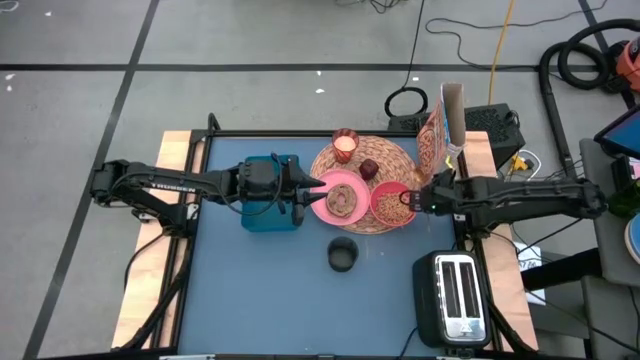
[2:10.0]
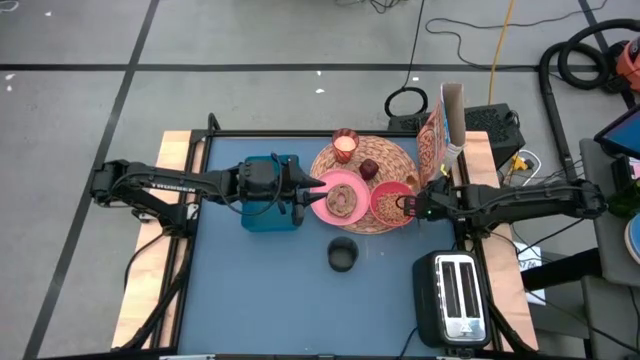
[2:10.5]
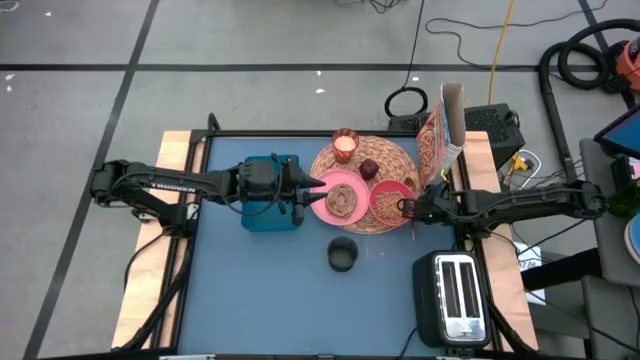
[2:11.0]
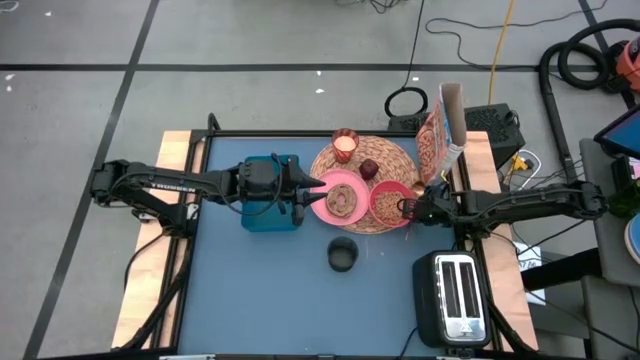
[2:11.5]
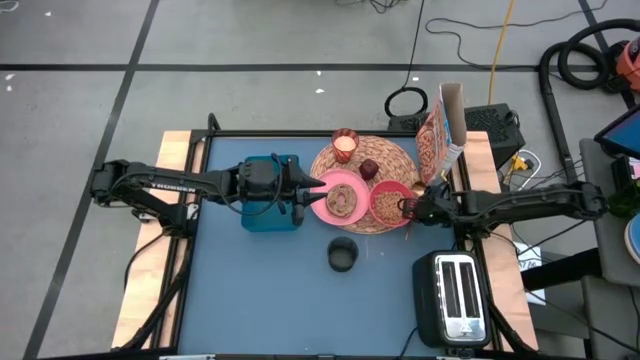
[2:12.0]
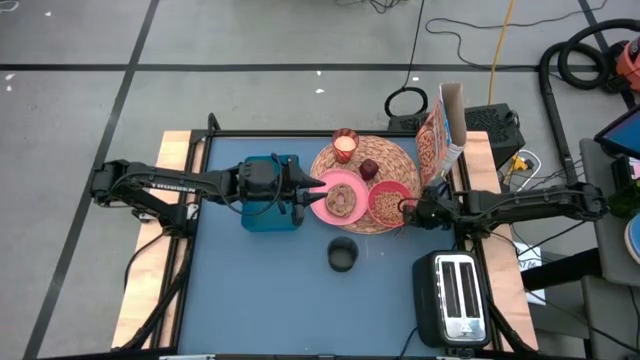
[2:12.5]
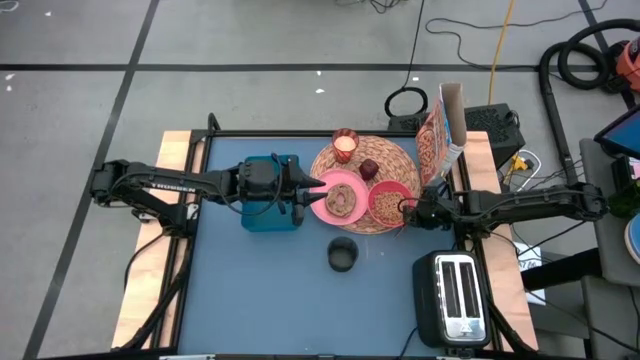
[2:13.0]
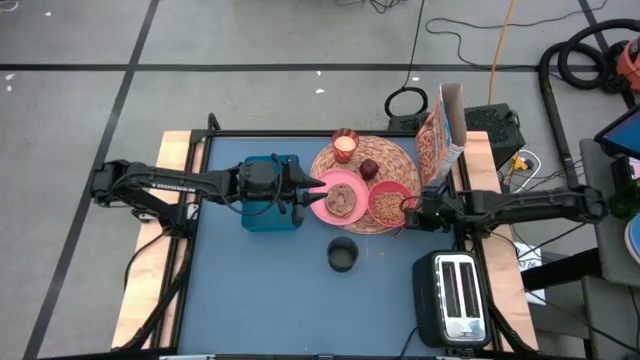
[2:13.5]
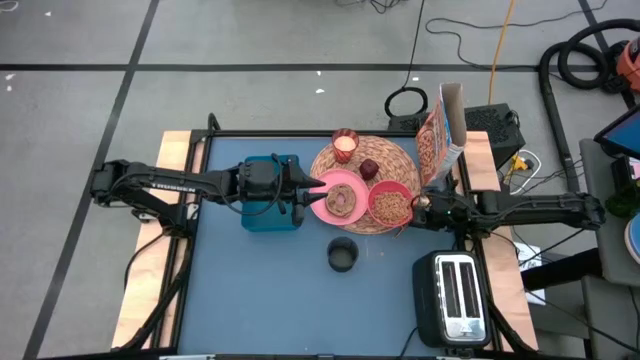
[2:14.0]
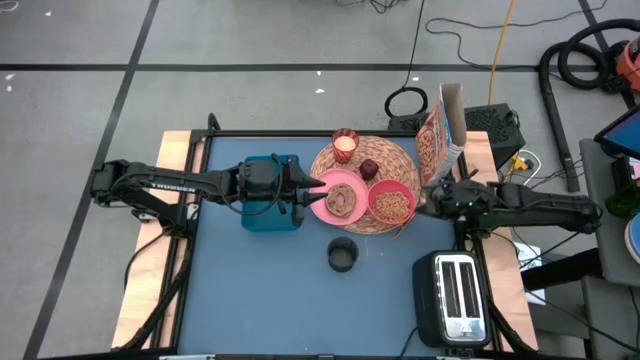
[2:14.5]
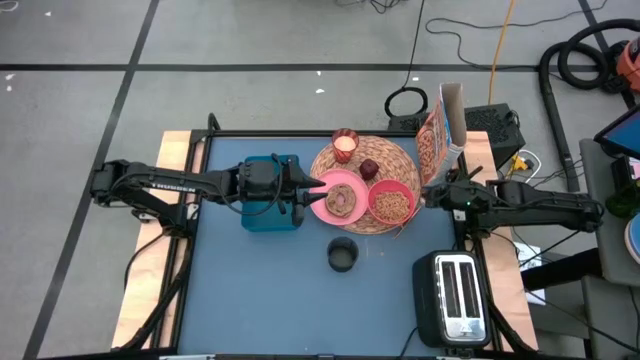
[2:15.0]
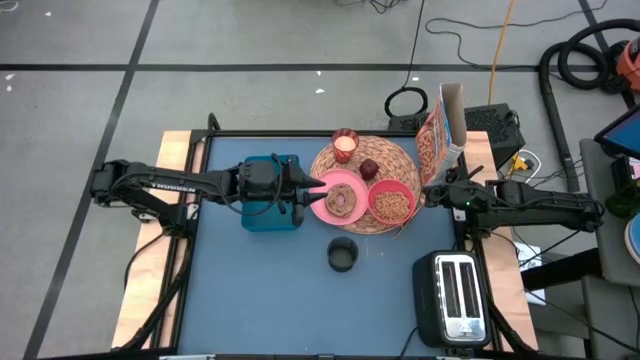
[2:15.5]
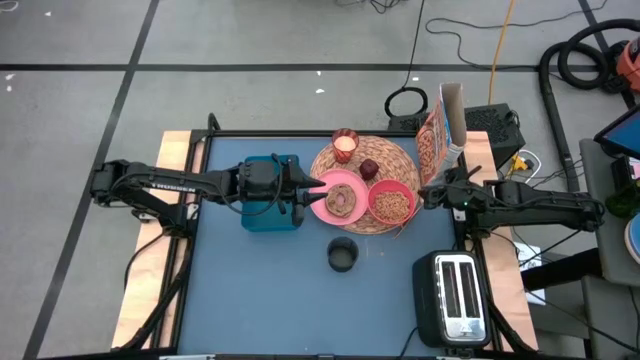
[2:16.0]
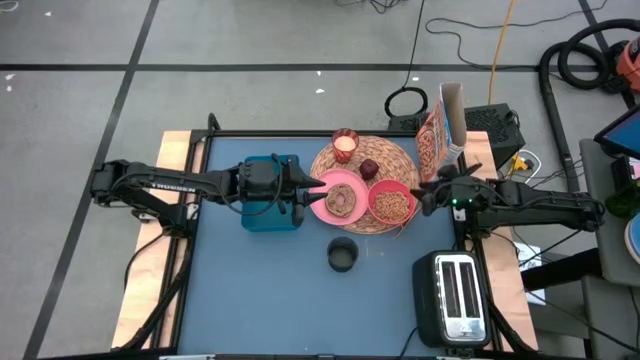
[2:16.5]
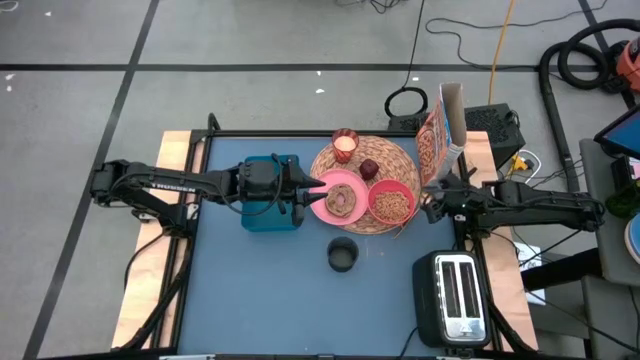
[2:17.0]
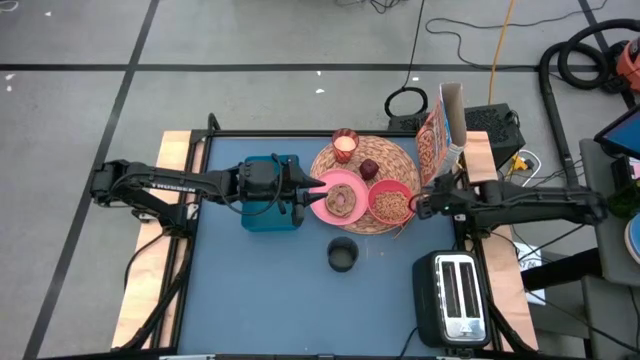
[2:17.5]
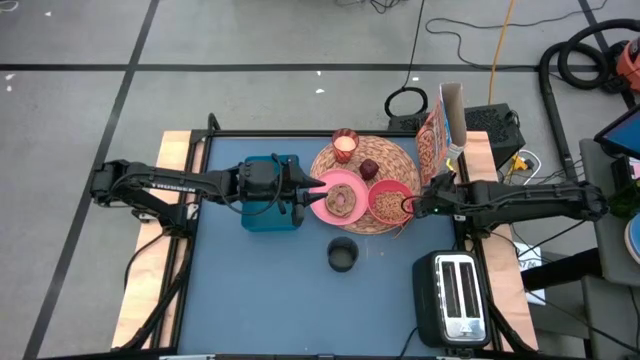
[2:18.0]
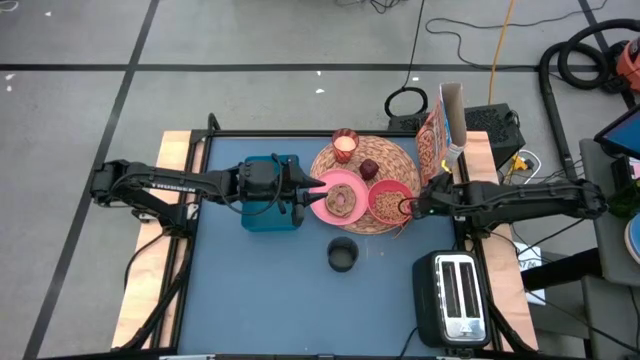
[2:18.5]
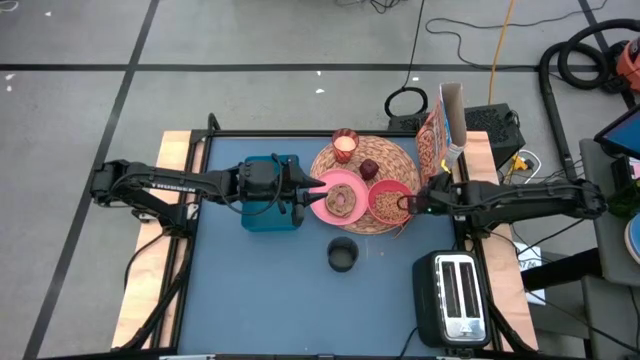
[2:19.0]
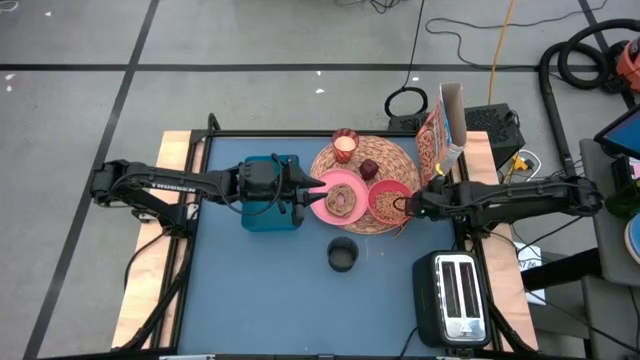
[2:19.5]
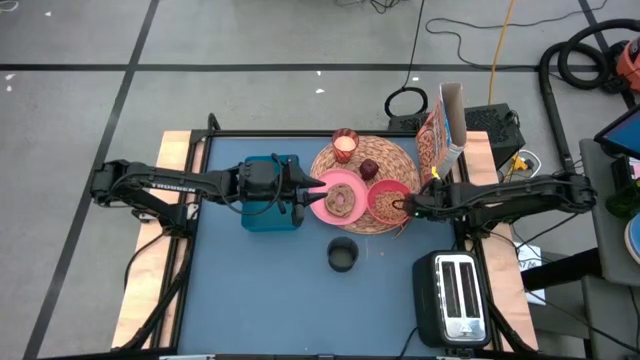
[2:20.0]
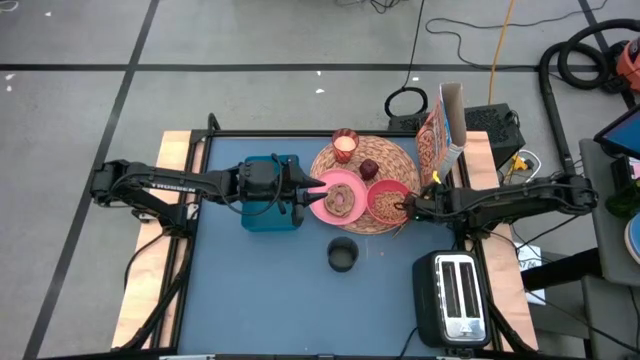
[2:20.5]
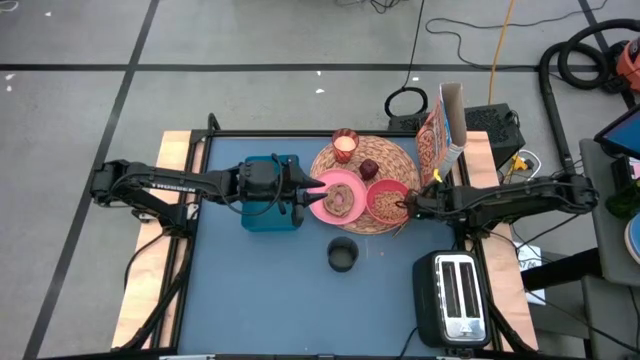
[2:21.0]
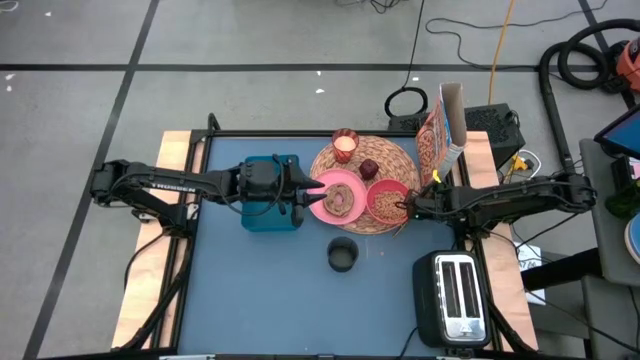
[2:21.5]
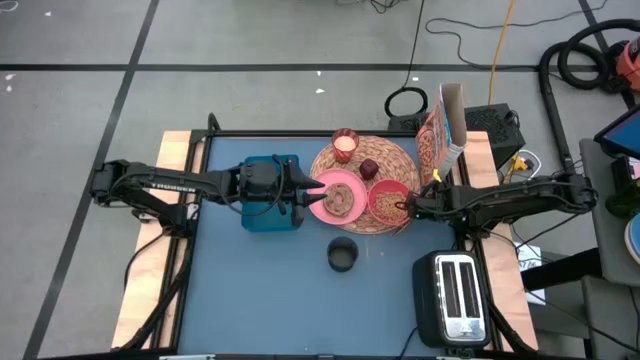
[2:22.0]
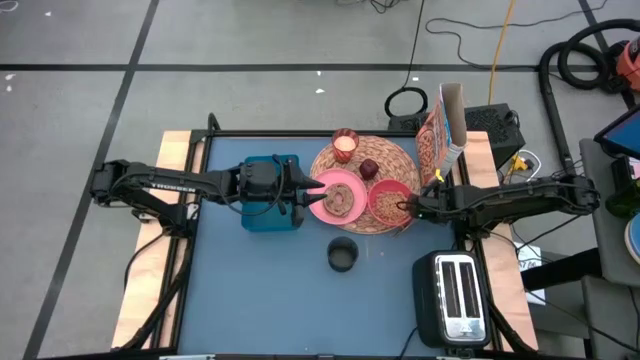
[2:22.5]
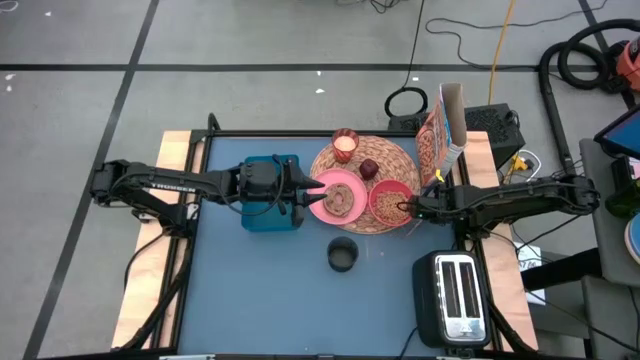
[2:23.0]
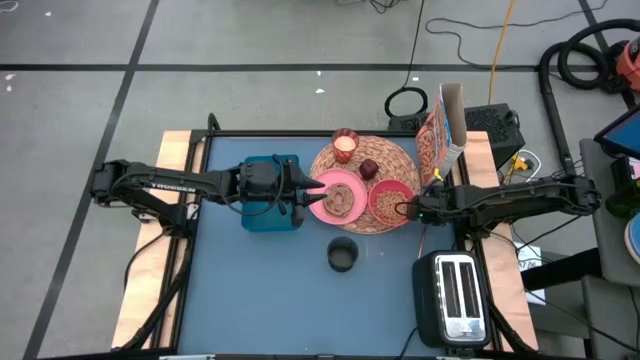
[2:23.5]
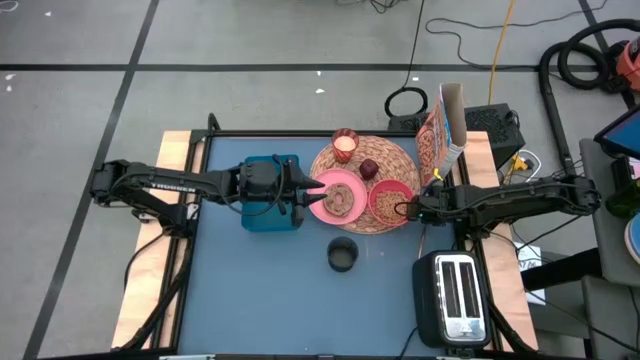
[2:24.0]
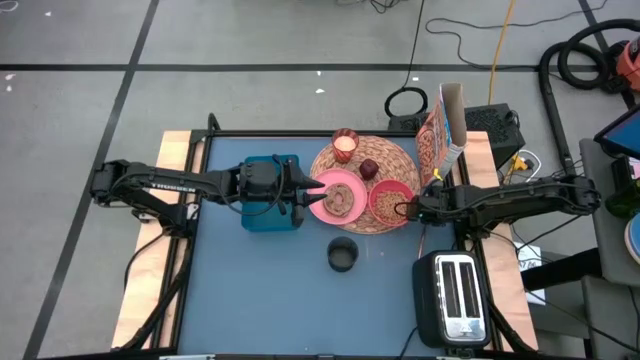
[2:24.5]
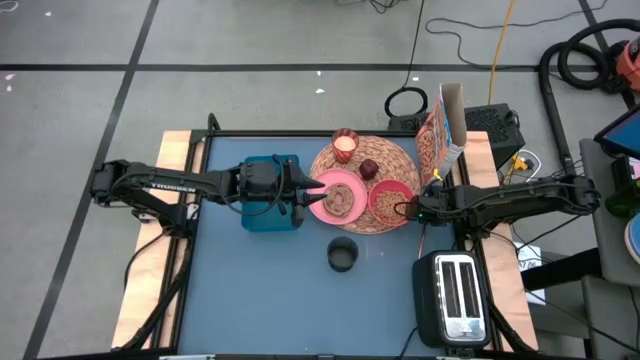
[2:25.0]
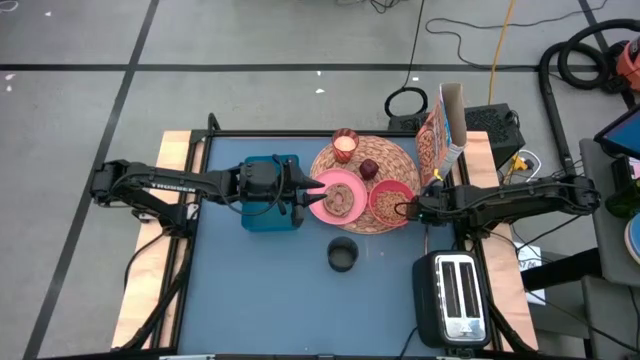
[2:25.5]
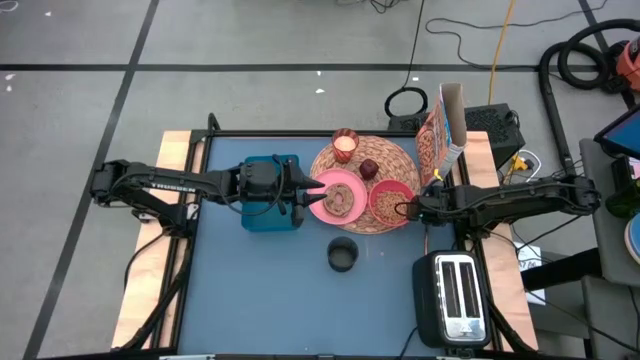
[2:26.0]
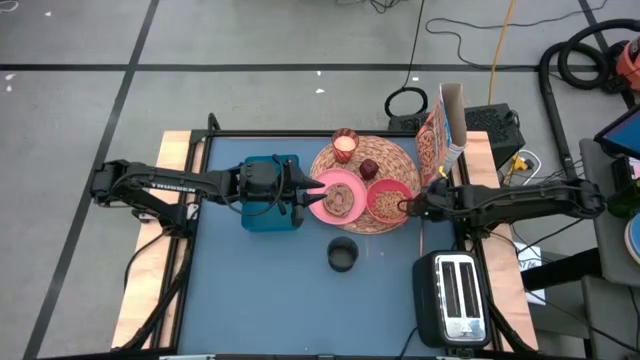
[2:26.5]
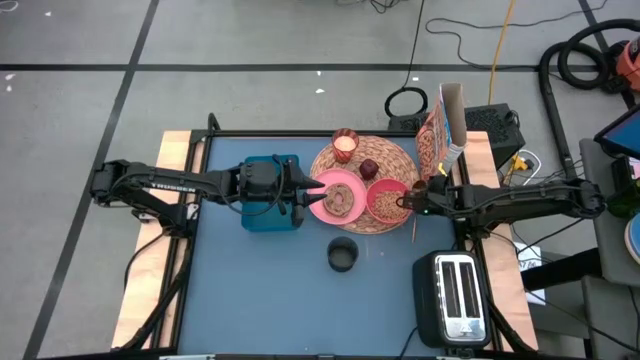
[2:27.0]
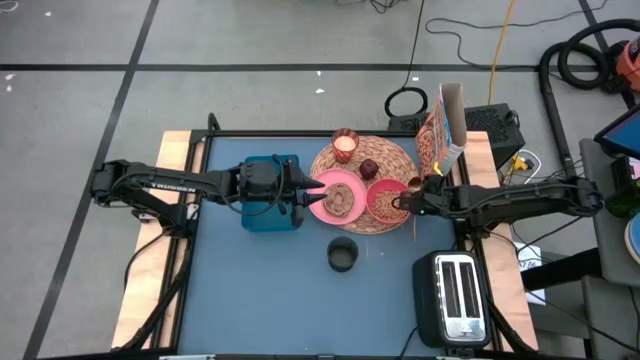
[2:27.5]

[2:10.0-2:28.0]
Task: Arrange a breakfast setting
Put the gold spoon to the right side of the pink bowl on the brown placemat

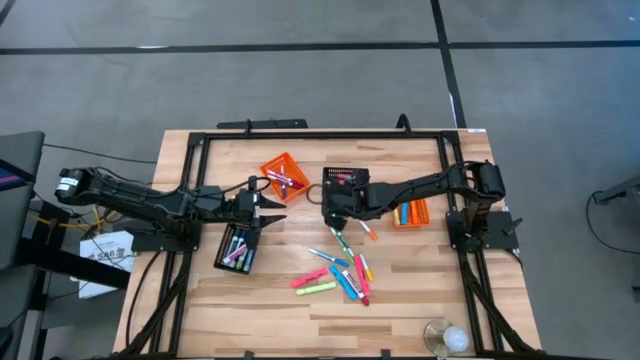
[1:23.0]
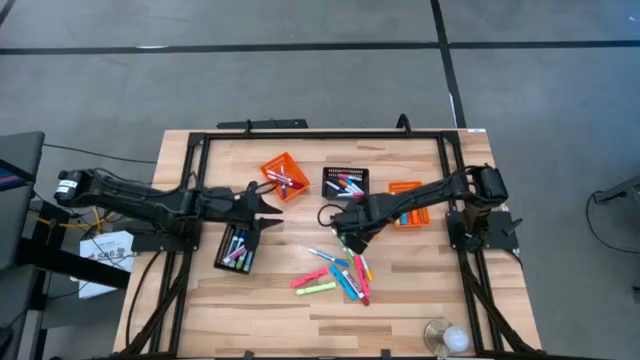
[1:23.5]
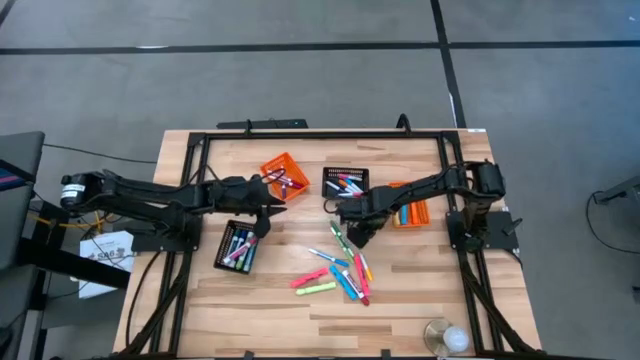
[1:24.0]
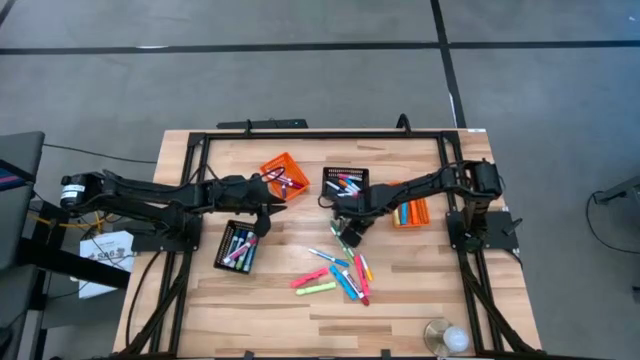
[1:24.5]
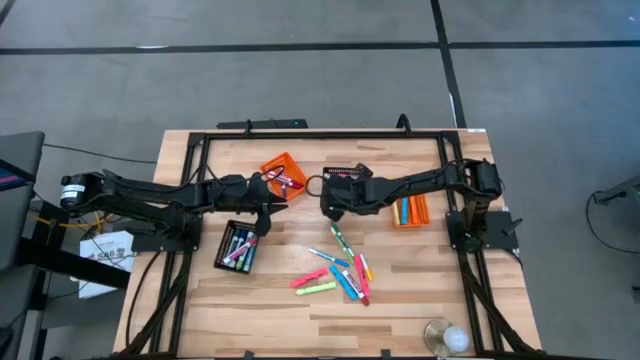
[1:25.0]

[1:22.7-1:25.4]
Task: Pick & Place Markers
Put the orange highlighter into the right black bin

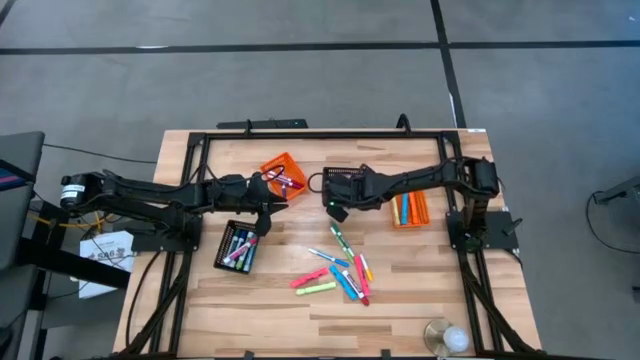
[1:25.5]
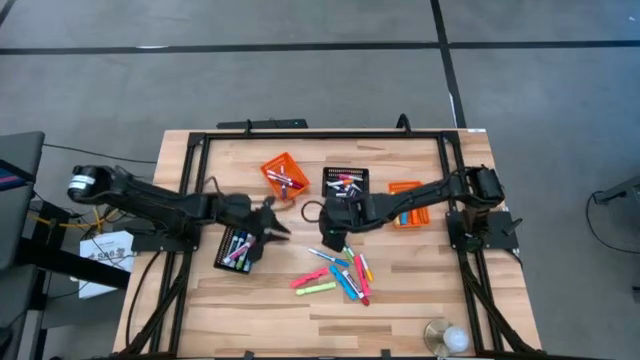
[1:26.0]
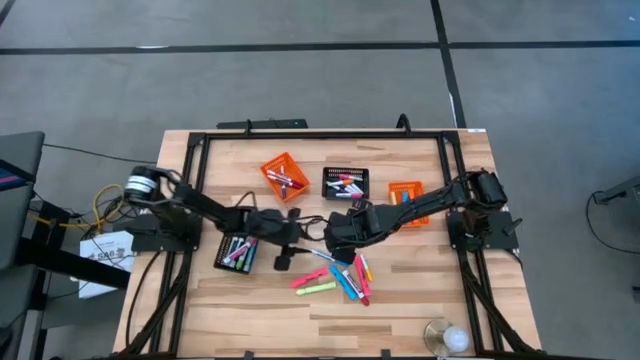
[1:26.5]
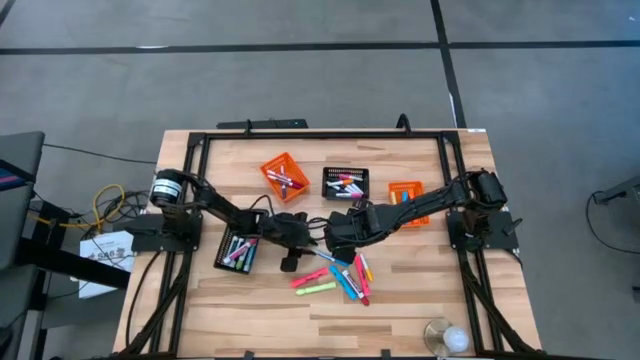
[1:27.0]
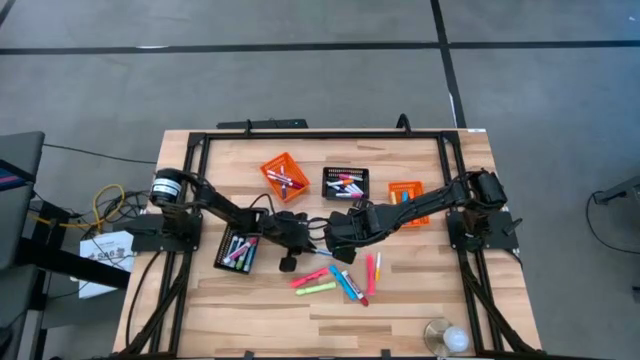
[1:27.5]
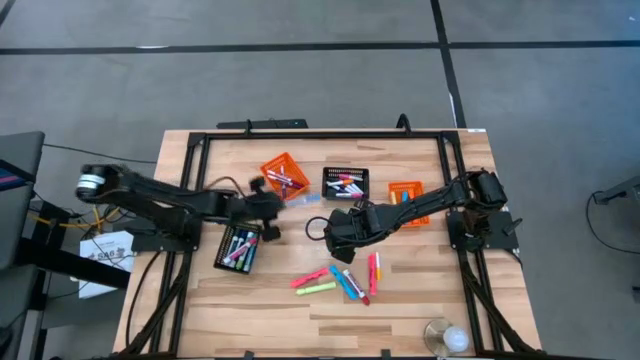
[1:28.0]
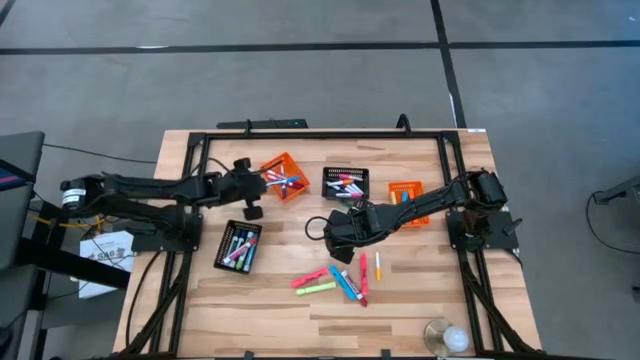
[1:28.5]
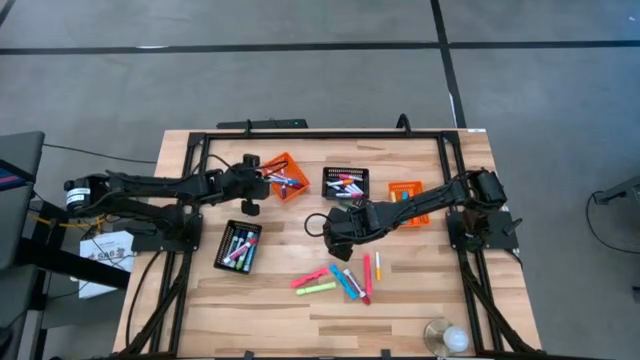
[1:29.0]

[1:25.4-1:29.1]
Put the blue marker into the left orange bin
